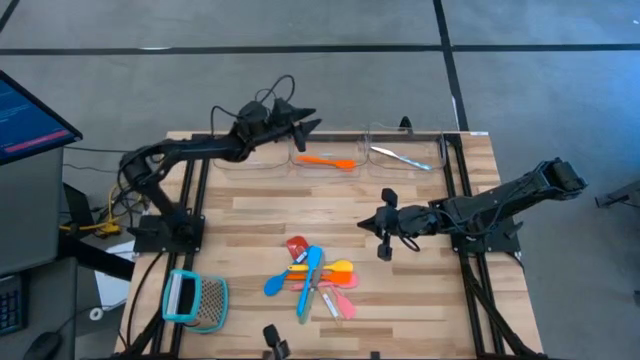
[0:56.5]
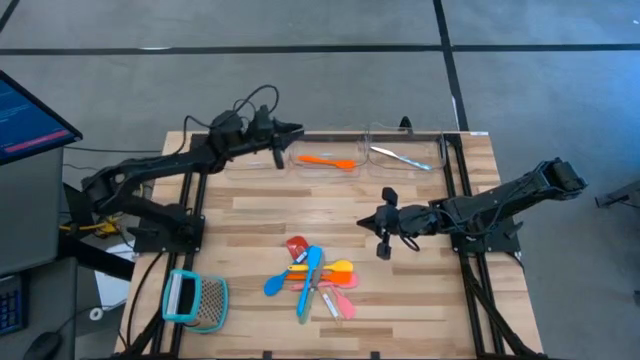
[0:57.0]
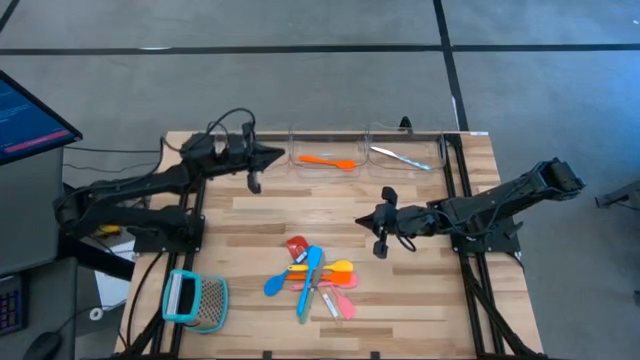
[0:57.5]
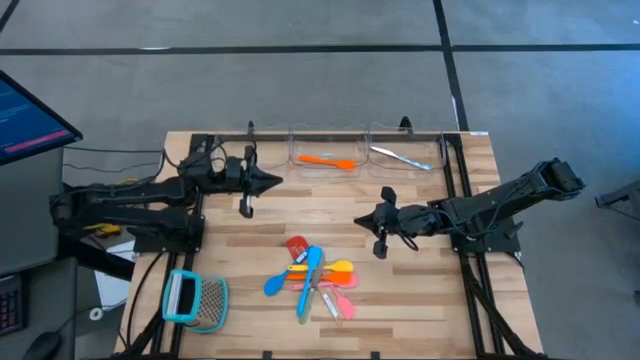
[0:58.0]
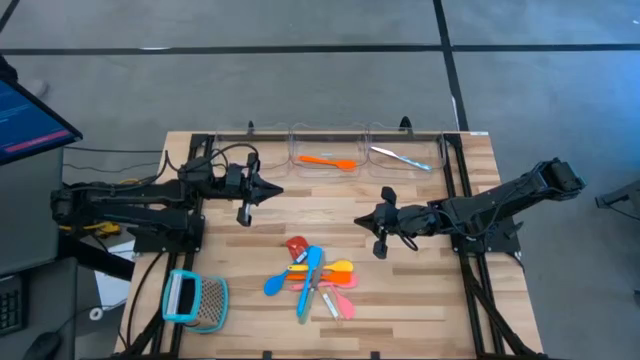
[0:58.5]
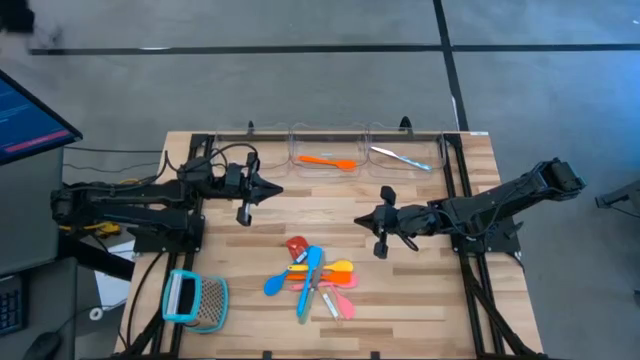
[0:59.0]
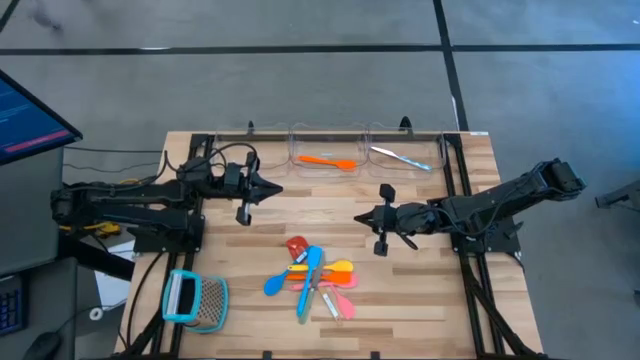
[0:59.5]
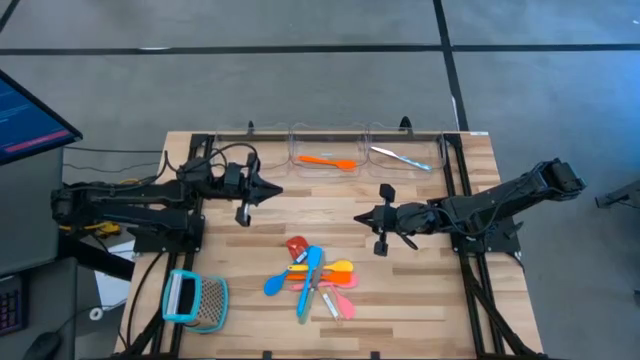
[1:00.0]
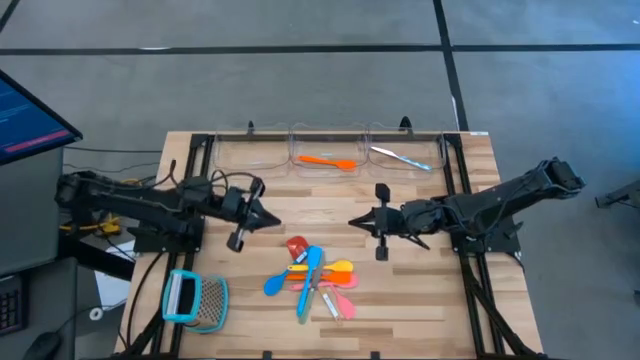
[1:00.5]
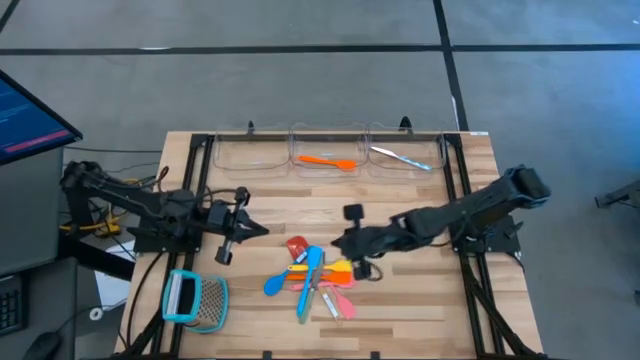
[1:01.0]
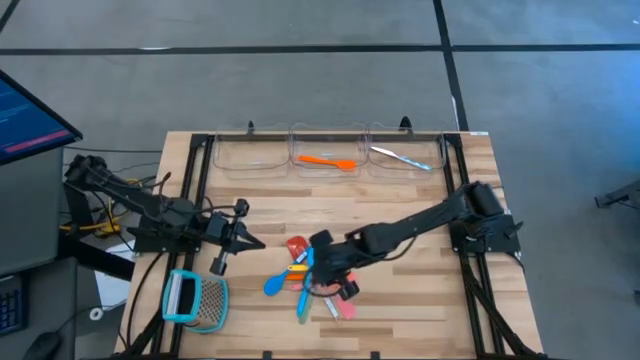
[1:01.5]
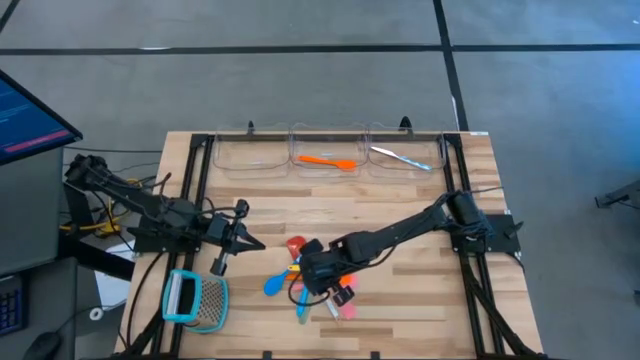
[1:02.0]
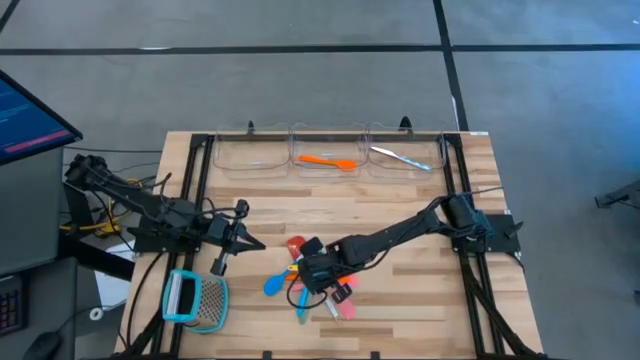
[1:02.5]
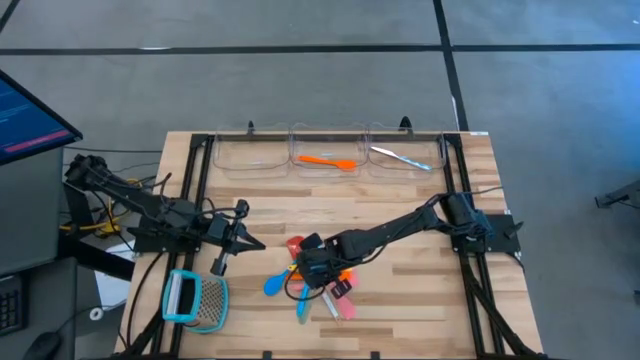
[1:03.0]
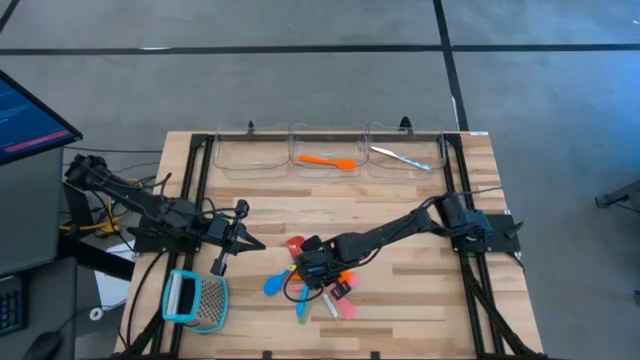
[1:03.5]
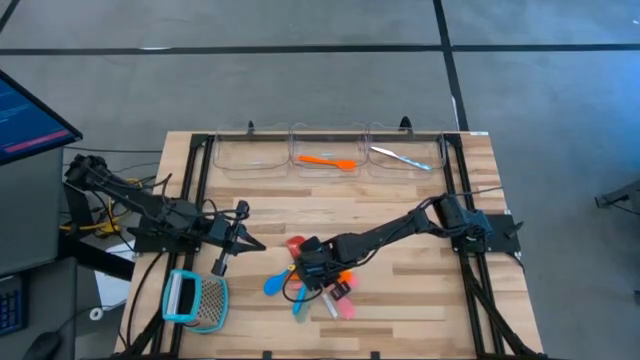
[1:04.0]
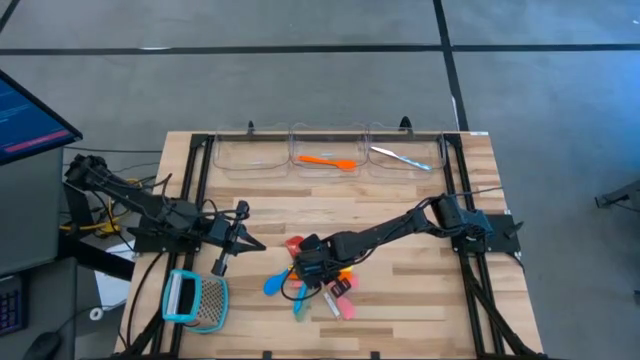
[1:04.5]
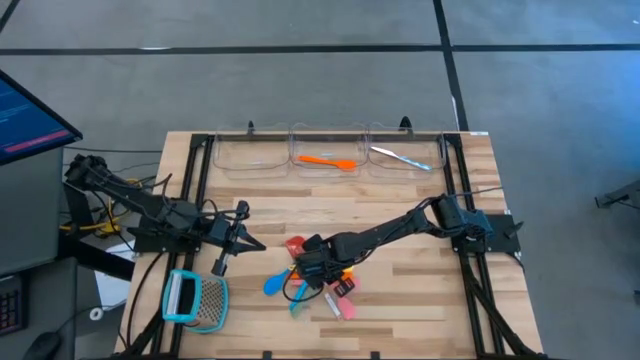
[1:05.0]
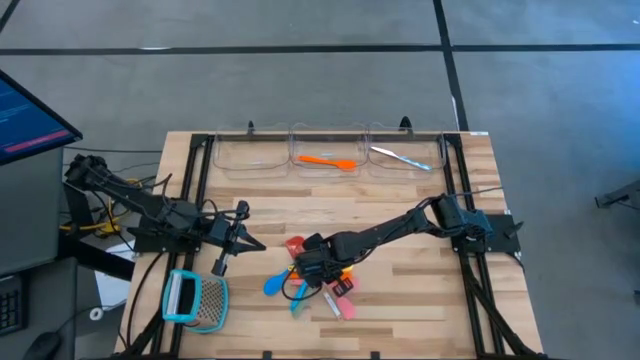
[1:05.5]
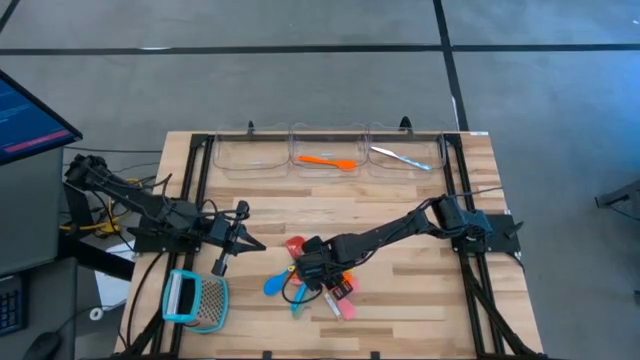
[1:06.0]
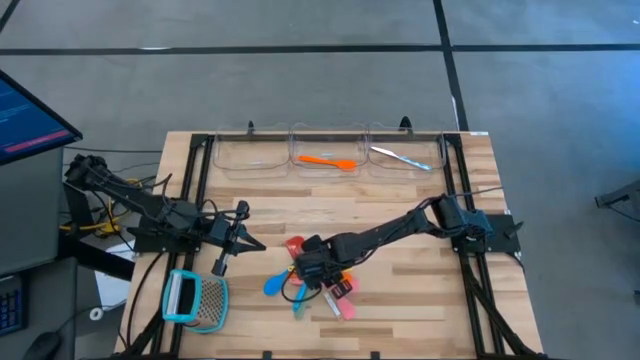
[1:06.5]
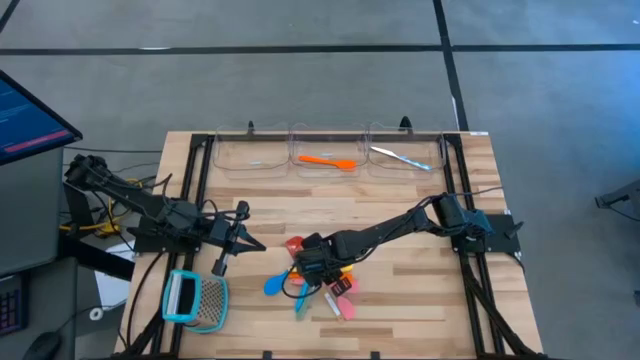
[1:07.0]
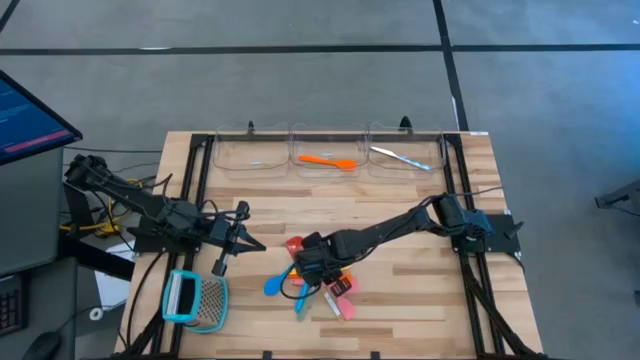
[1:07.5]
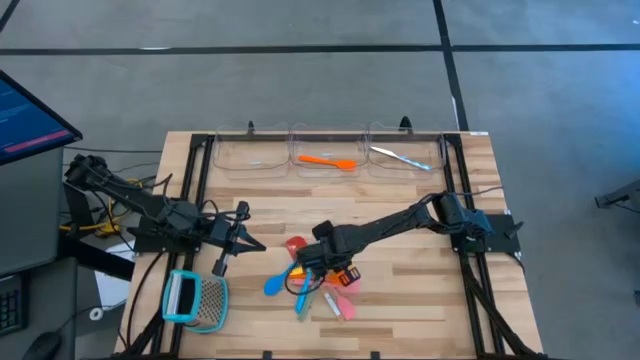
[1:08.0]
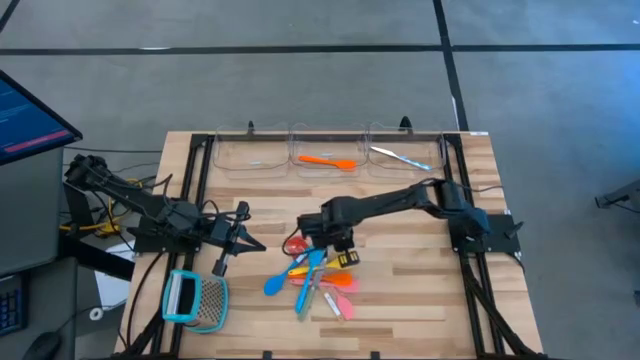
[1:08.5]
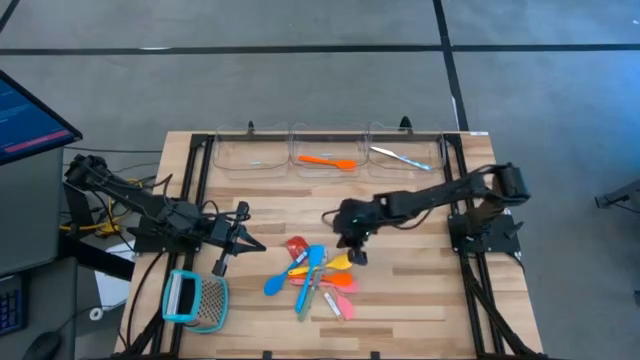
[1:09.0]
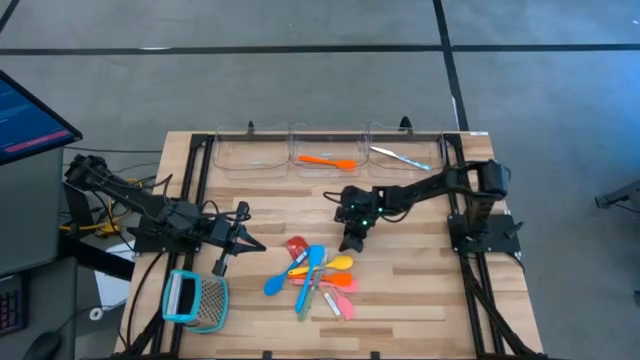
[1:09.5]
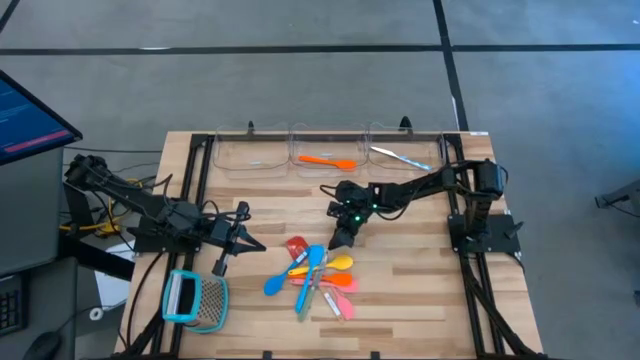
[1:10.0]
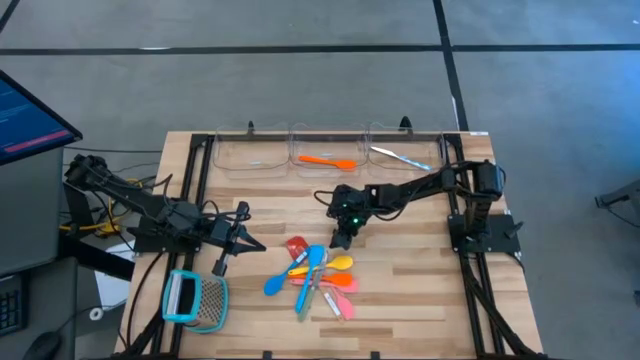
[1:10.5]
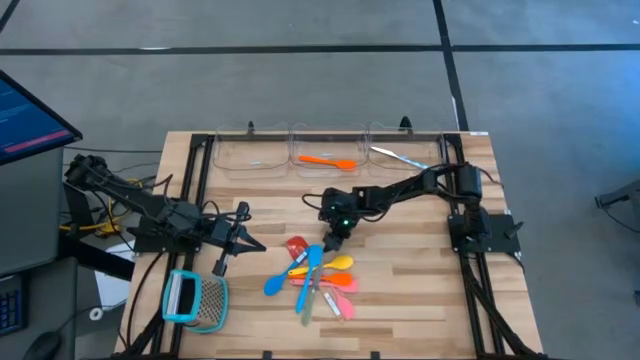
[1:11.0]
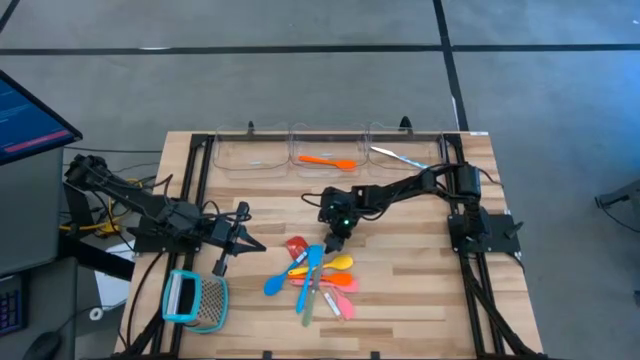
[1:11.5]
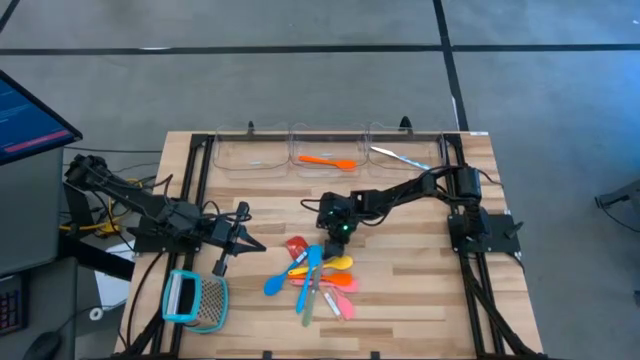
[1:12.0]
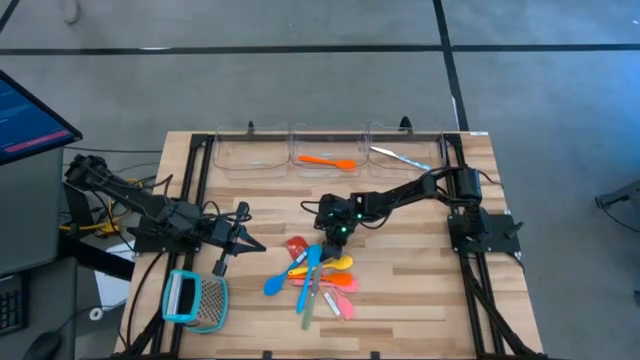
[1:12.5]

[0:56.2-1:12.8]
Task: Pick & Place Kitchen Items
Put the green table knife into the right transparent bin

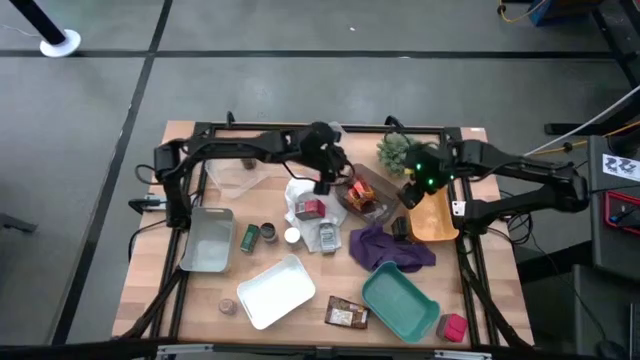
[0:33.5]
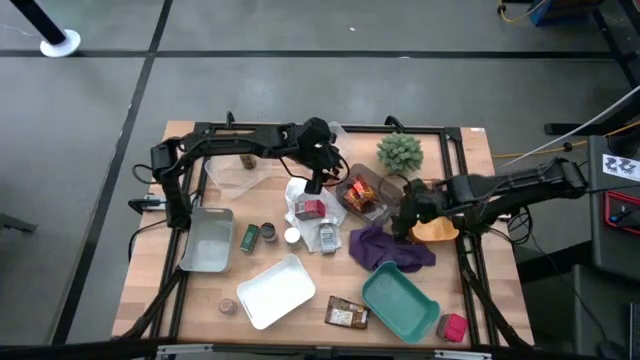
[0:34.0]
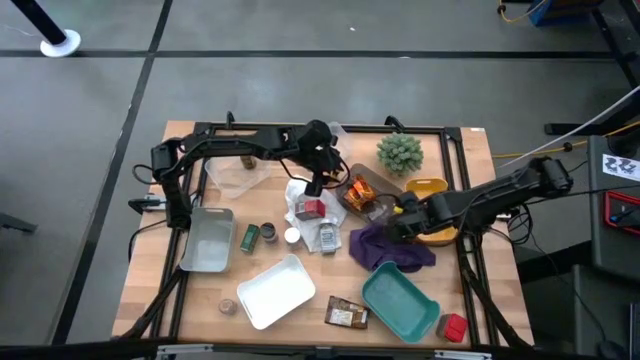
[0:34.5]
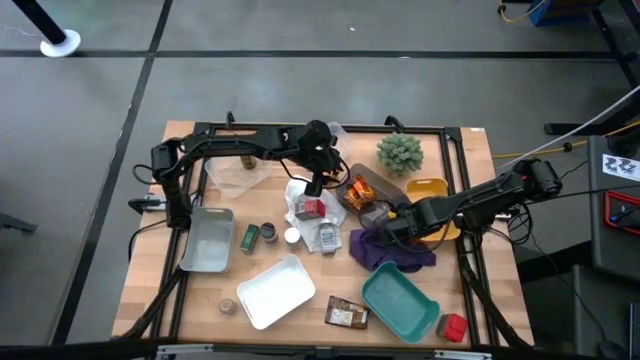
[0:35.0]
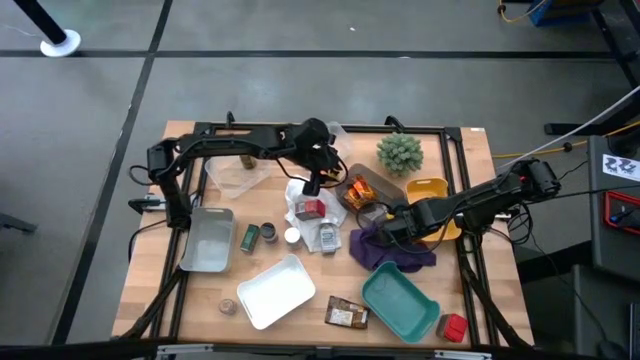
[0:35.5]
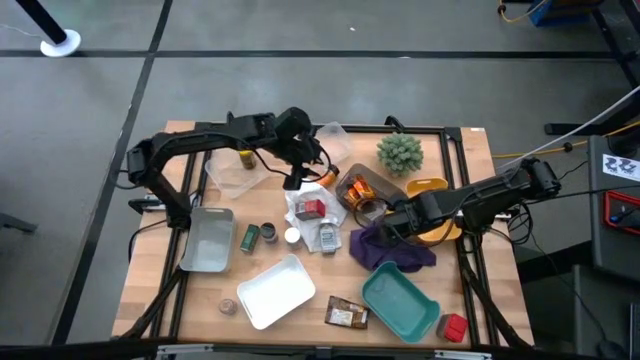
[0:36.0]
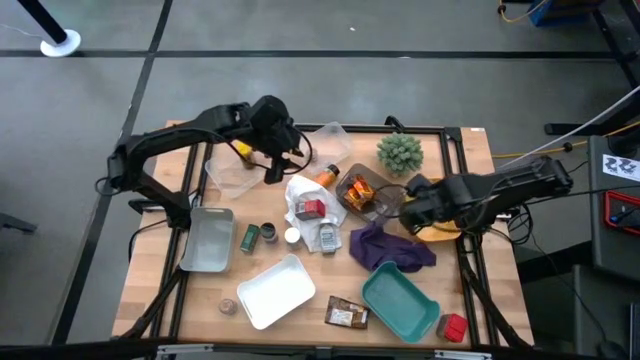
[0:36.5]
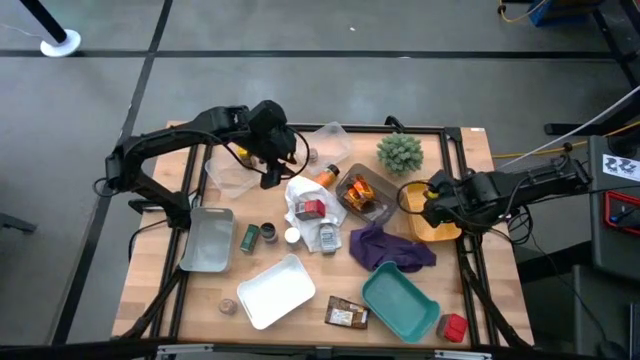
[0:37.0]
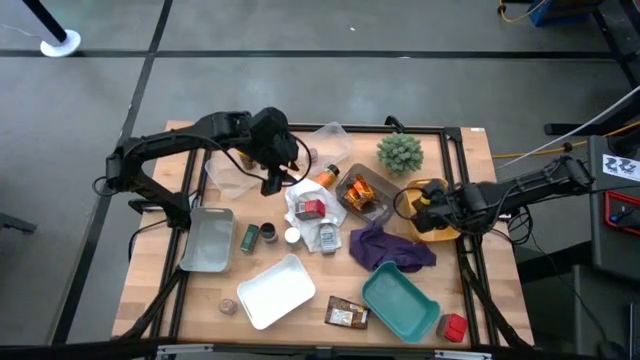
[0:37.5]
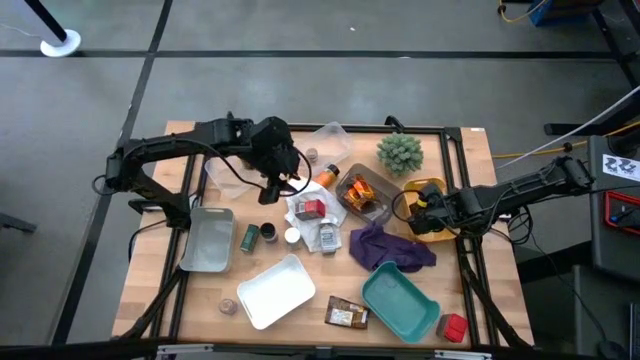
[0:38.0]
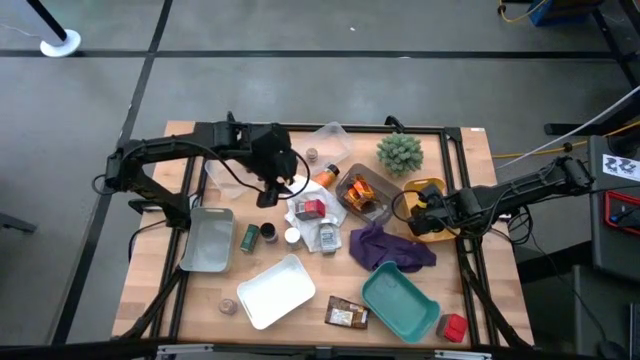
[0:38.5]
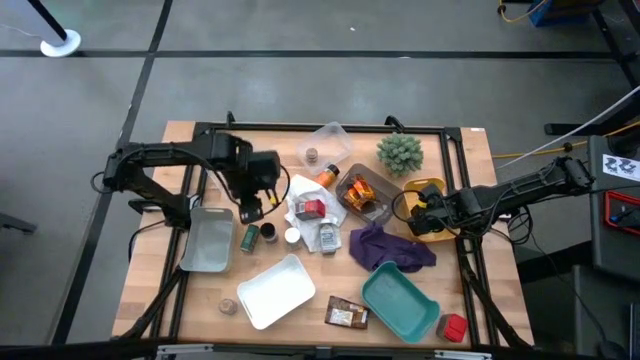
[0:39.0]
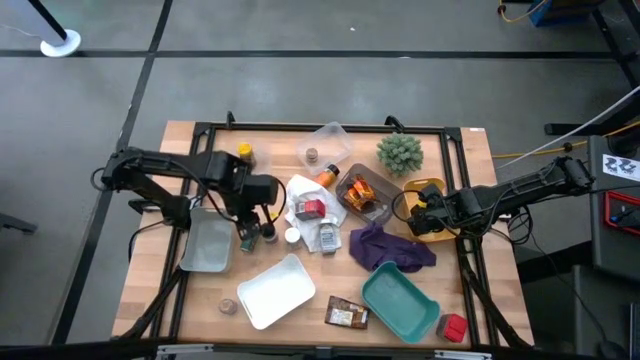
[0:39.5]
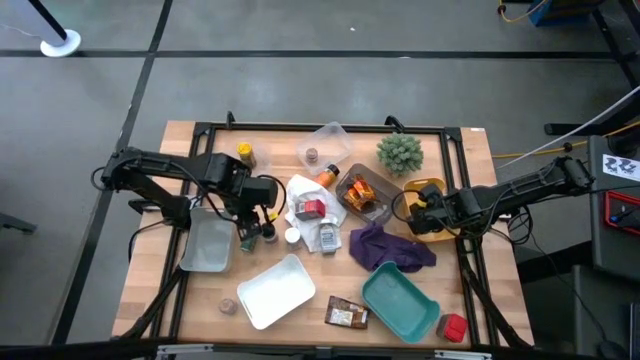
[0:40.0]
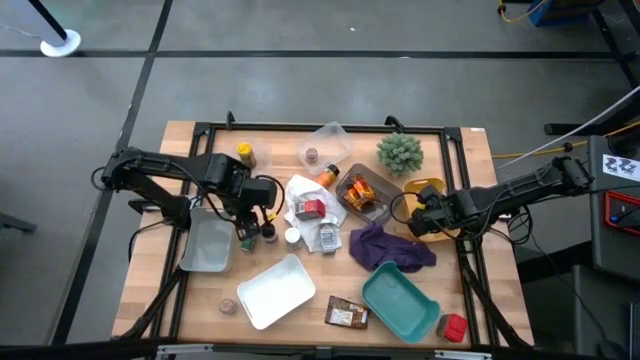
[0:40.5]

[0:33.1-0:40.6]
Task: Sort spices by type
Put the right black spice can into the yellow bin
